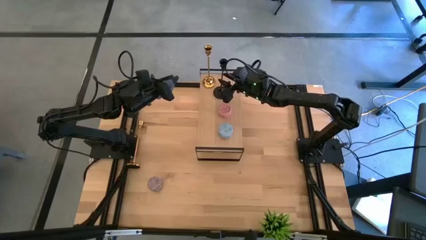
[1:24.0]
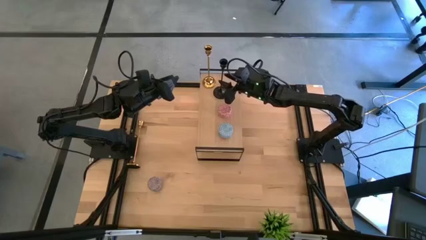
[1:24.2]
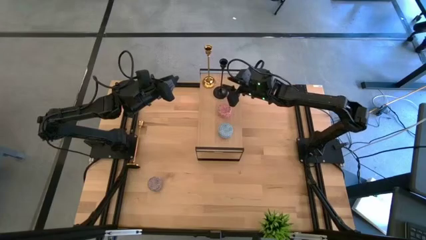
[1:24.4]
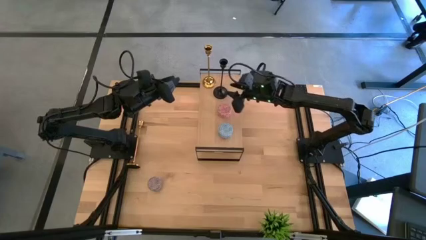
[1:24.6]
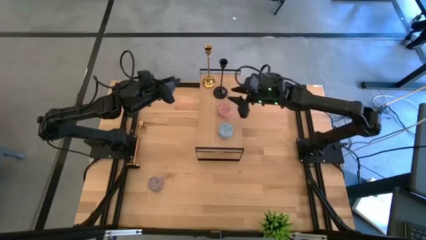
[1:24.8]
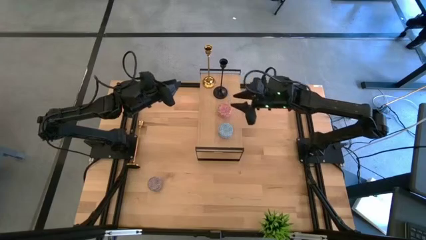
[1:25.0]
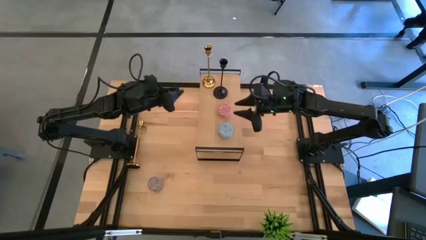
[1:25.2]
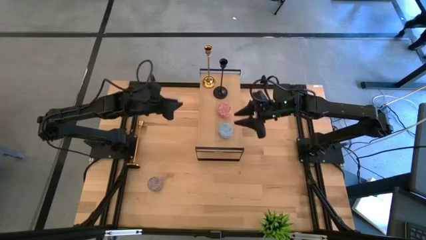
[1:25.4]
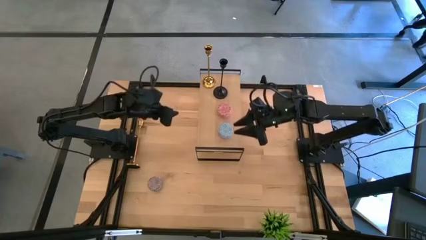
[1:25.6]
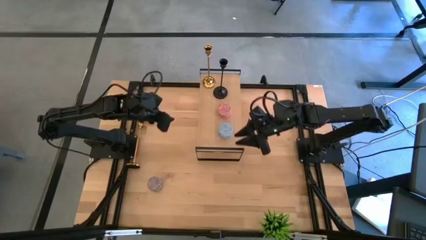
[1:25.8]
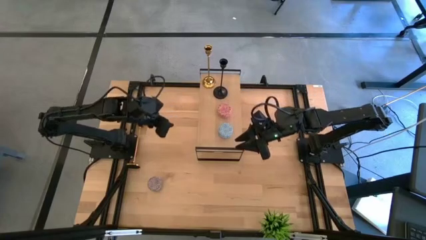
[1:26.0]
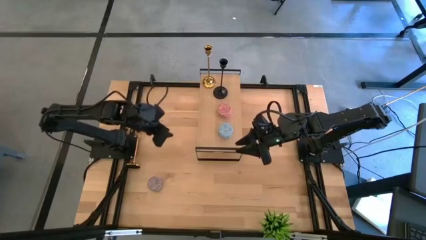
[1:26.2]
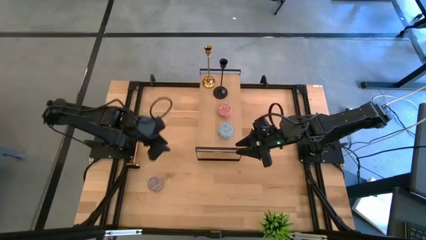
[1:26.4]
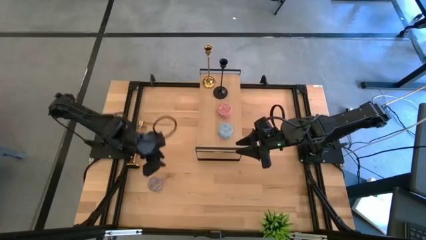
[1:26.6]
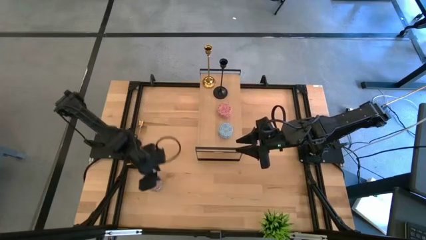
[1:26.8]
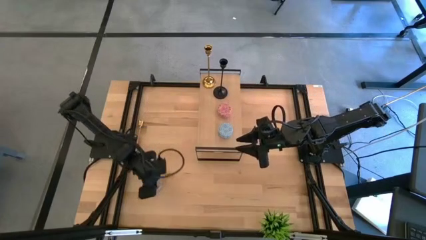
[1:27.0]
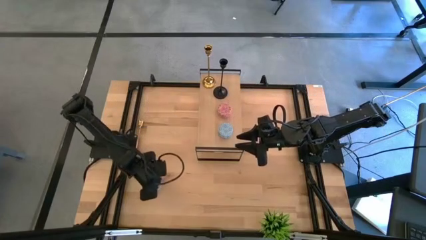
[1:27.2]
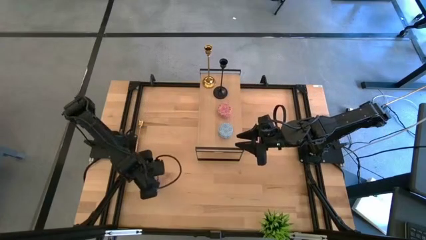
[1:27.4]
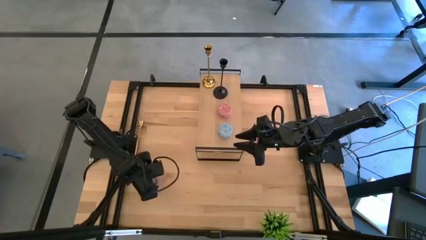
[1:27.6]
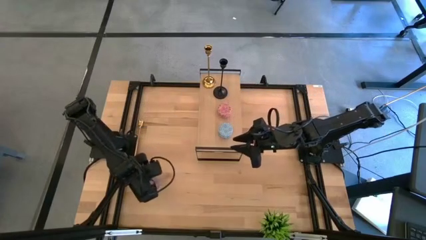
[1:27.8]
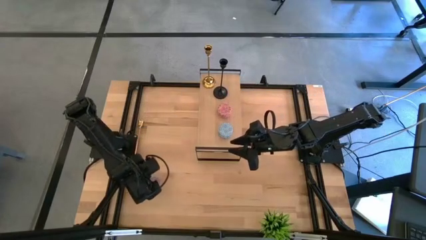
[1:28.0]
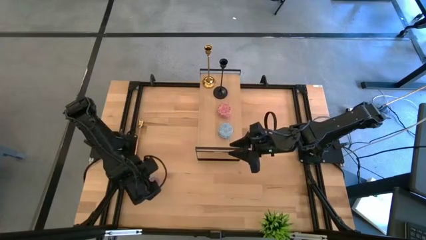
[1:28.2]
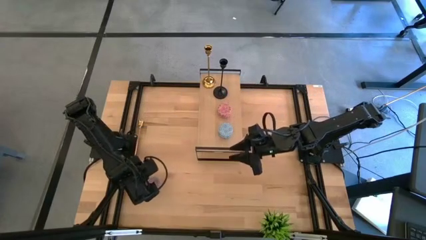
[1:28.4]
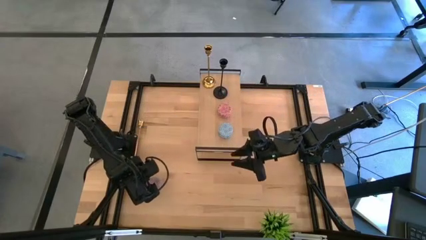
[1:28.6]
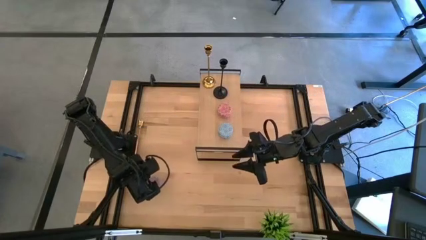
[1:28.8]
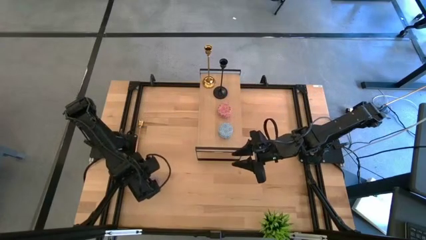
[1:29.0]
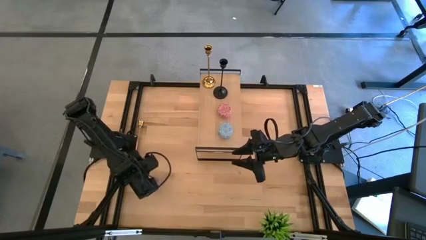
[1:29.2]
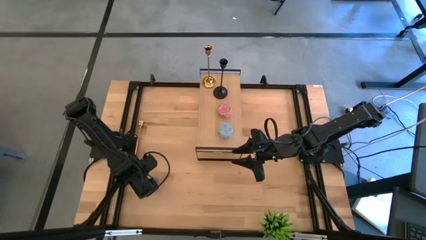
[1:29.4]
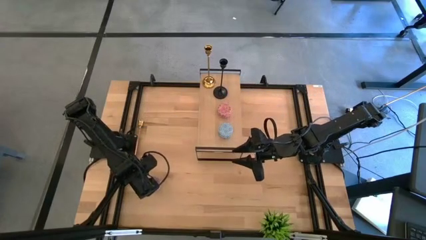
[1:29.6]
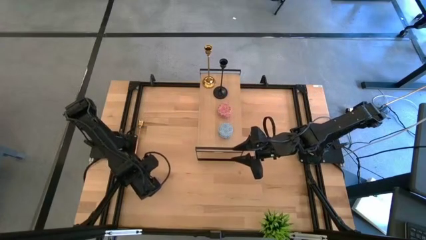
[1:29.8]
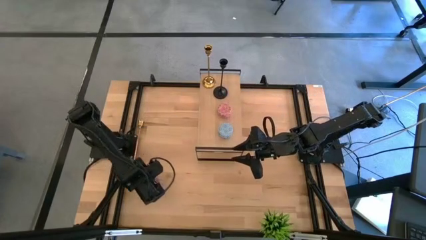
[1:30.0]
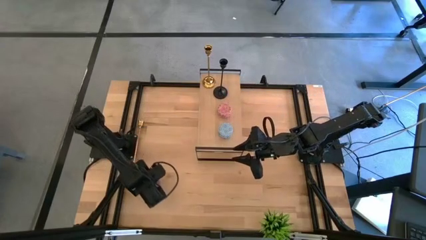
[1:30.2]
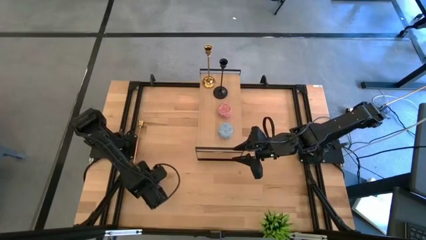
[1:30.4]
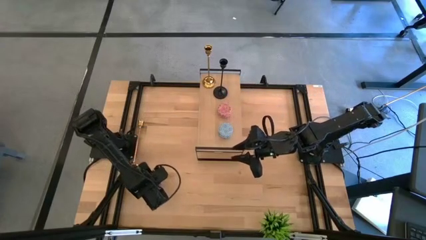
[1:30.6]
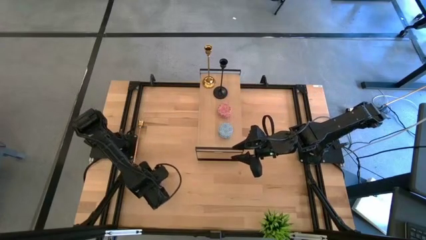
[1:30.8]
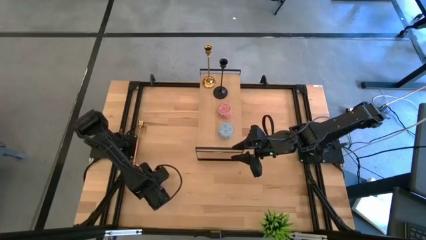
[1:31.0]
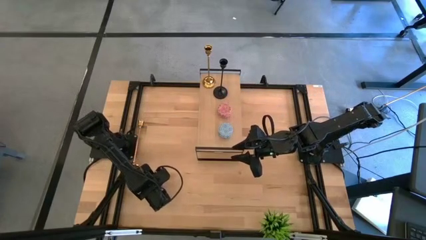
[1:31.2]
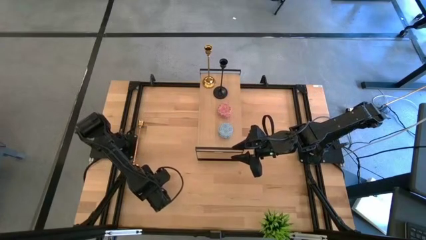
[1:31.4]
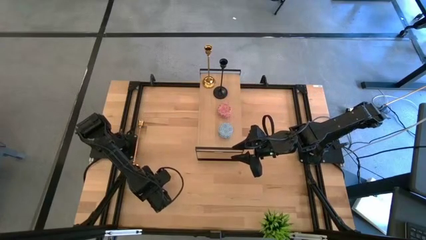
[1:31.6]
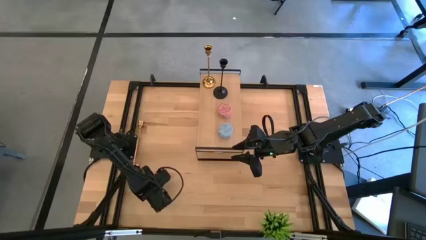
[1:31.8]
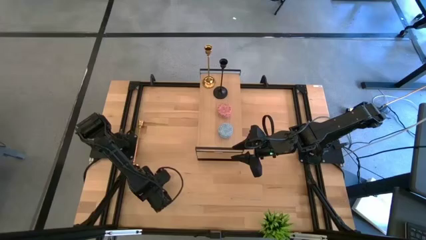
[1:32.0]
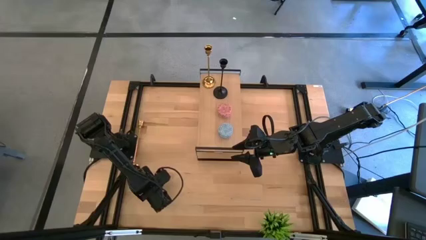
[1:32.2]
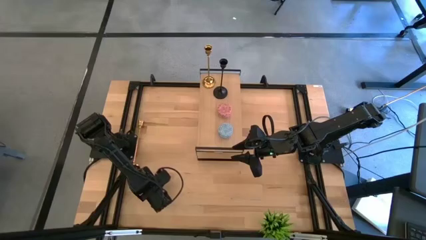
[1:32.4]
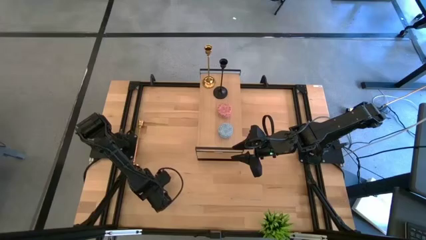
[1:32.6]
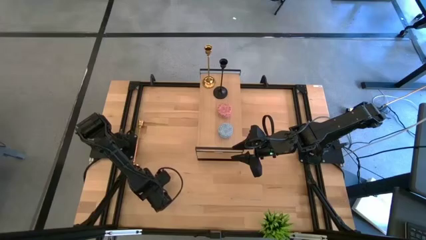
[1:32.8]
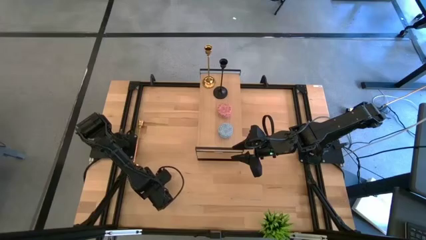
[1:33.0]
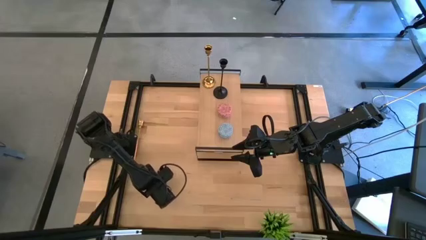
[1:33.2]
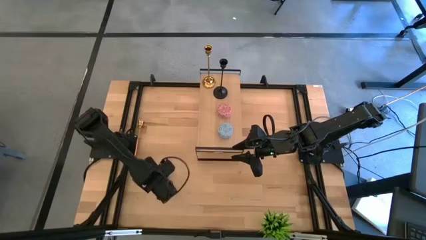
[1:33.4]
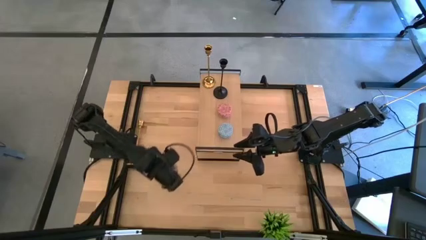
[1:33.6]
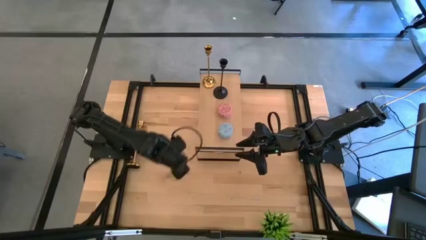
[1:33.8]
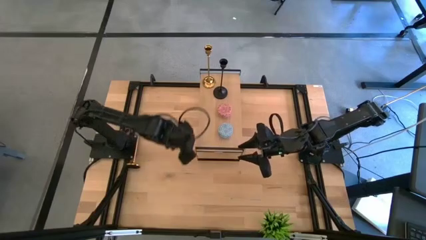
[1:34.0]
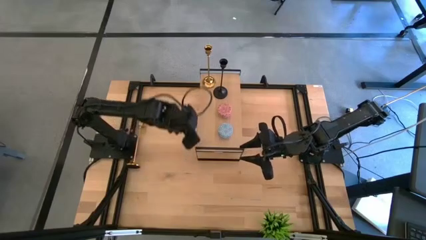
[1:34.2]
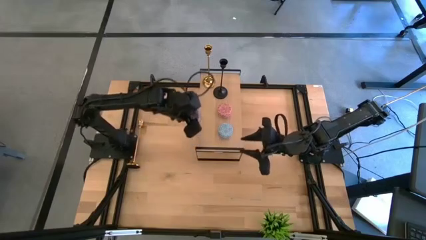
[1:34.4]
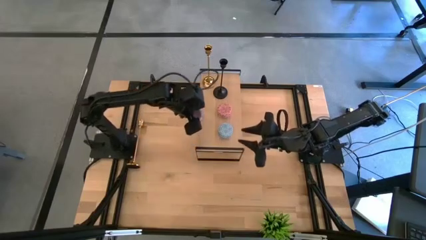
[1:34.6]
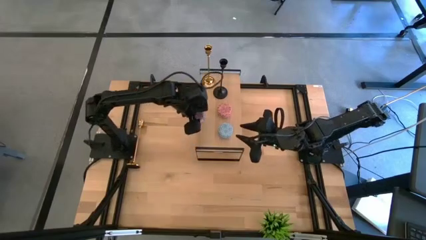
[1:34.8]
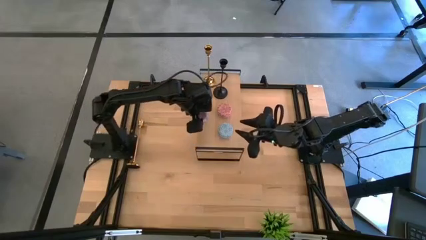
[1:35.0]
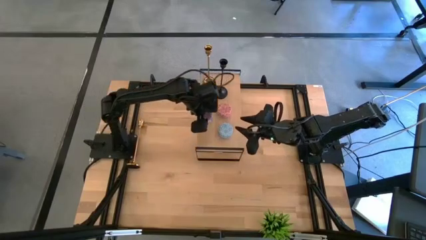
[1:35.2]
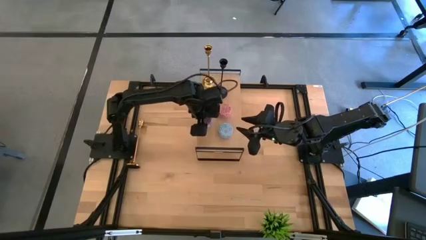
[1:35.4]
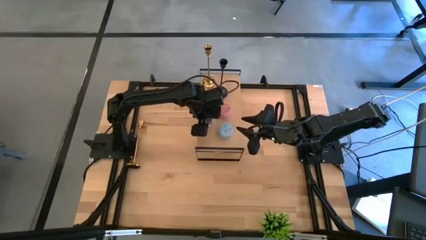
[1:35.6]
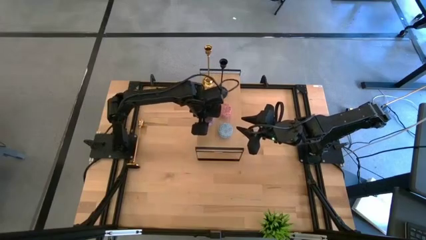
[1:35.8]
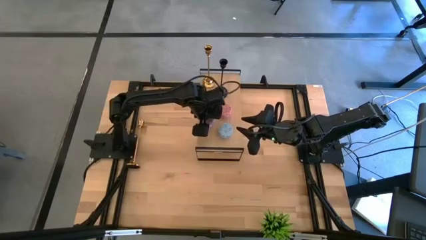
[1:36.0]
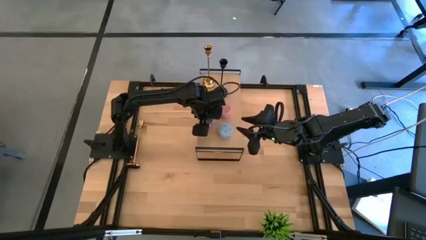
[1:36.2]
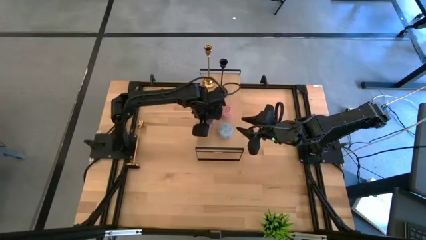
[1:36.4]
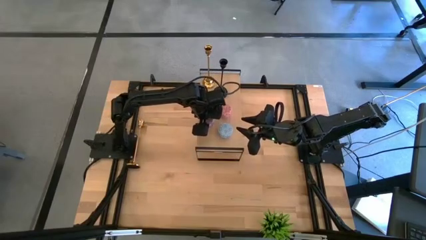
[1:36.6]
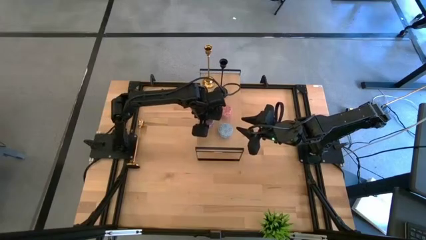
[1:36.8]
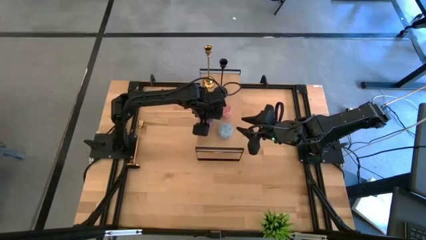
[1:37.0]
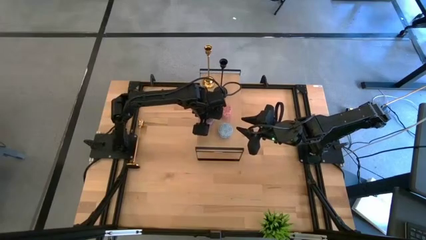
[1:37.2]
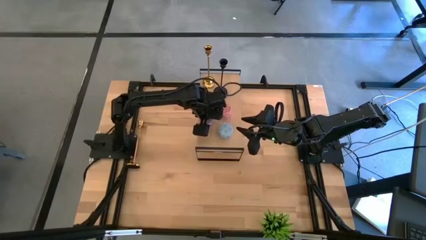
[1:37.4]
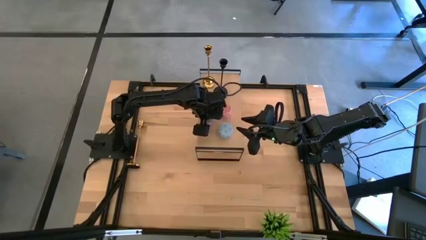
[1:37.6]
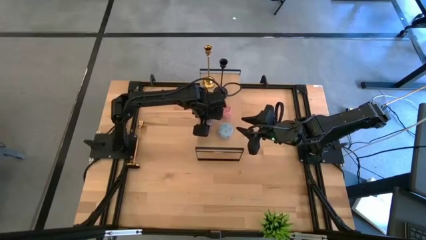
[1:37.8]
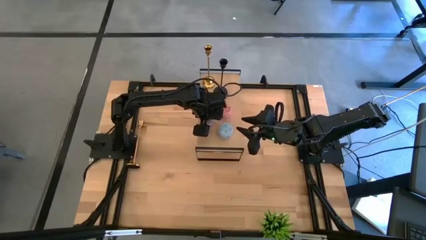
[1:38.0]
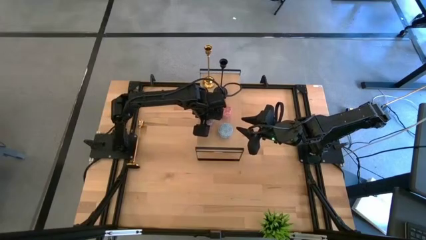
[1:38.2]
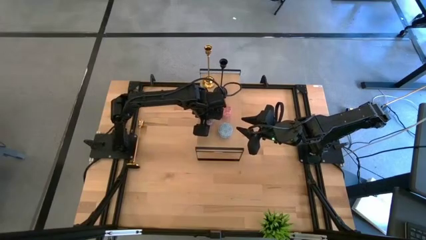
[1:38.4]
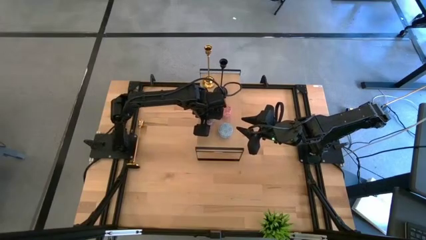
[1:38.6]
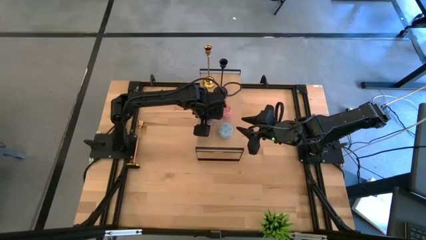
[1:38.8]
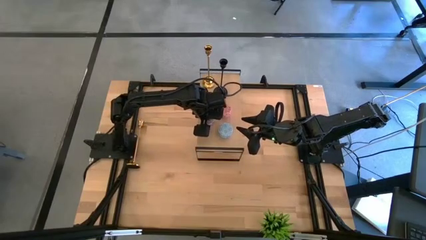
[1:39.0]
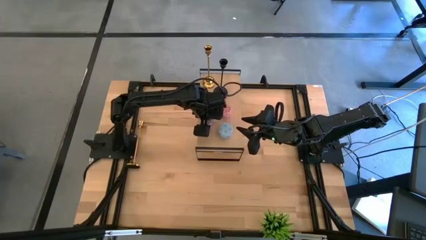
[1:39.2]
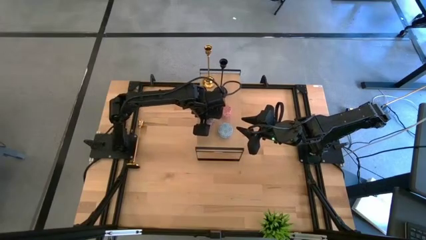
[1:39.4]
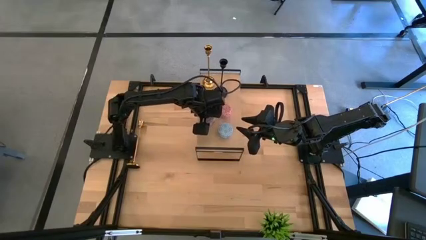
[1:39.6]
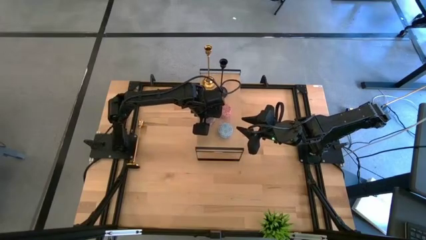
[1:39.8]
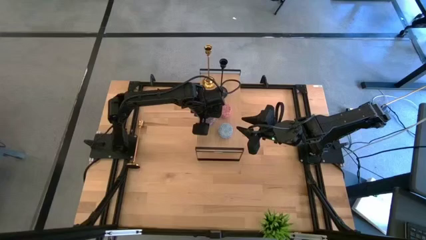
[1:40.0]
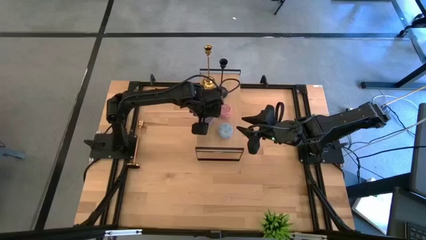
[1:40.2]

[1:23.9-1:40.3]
Task: Pick & Place candle stick holders
Put the violet scented candle on the shelf
